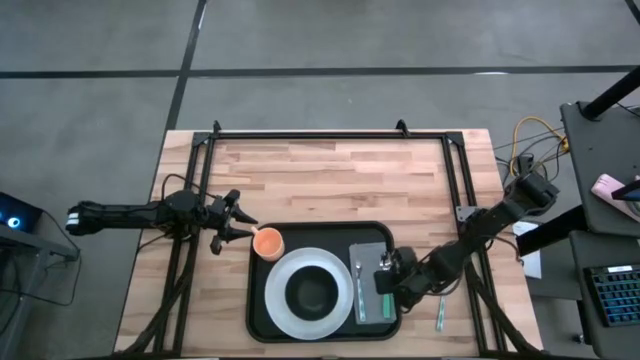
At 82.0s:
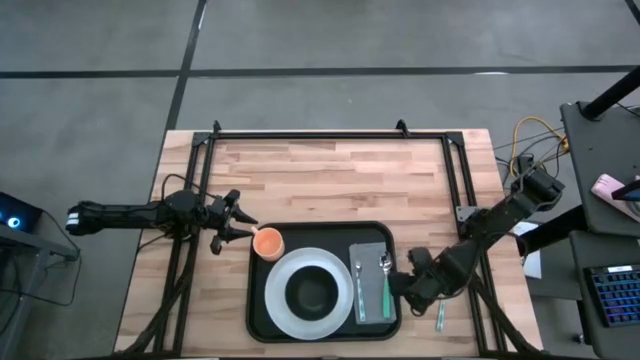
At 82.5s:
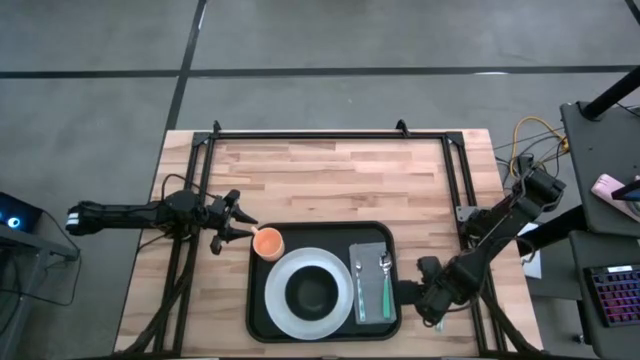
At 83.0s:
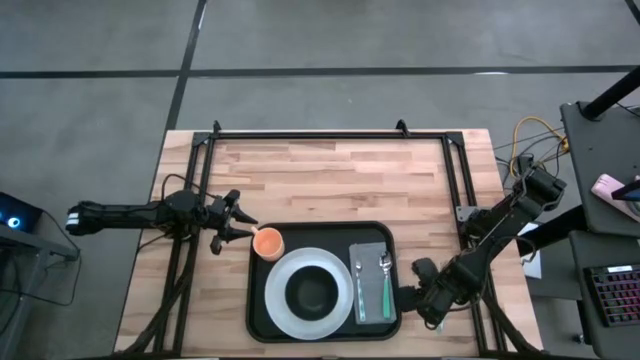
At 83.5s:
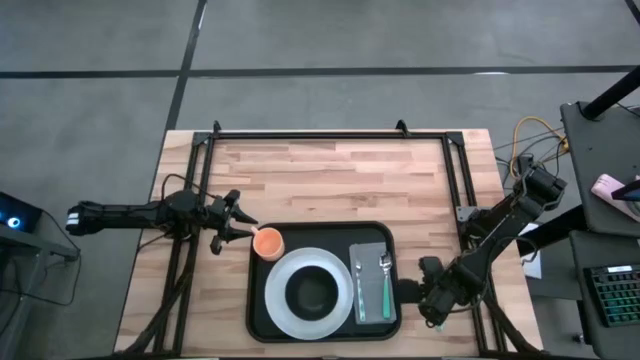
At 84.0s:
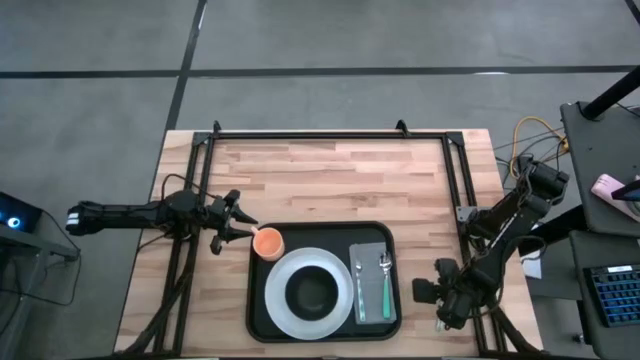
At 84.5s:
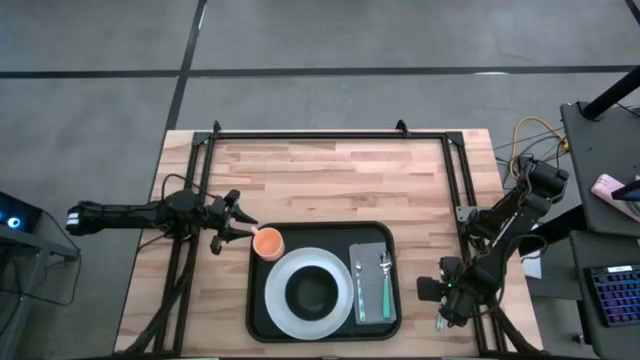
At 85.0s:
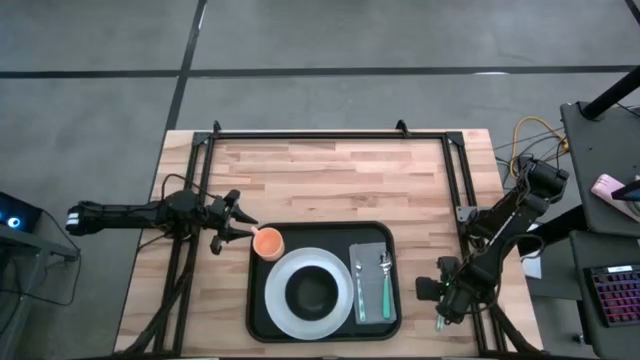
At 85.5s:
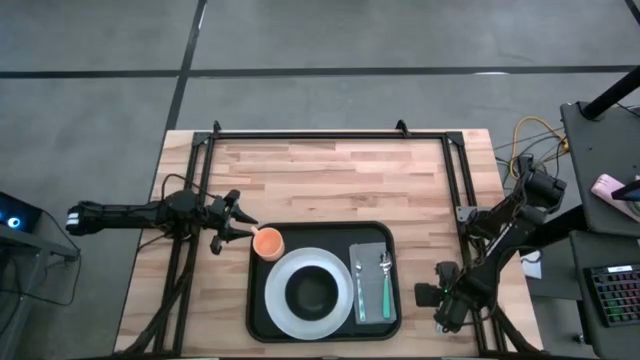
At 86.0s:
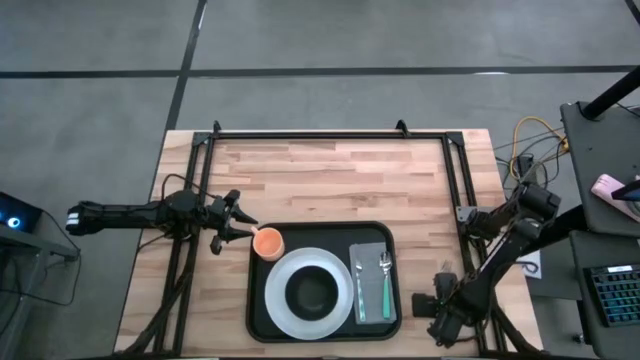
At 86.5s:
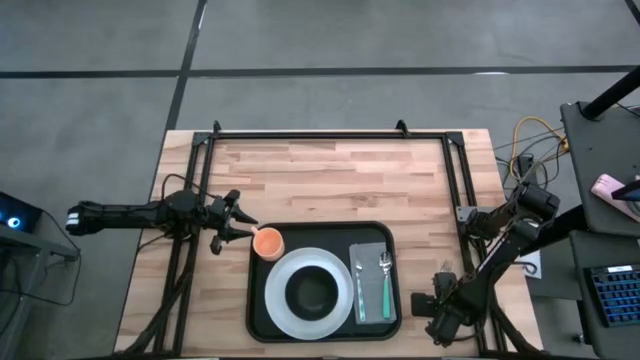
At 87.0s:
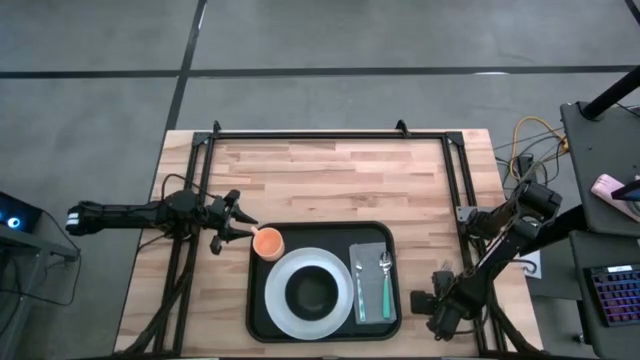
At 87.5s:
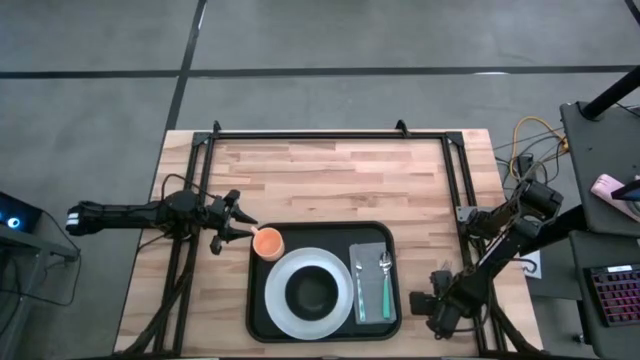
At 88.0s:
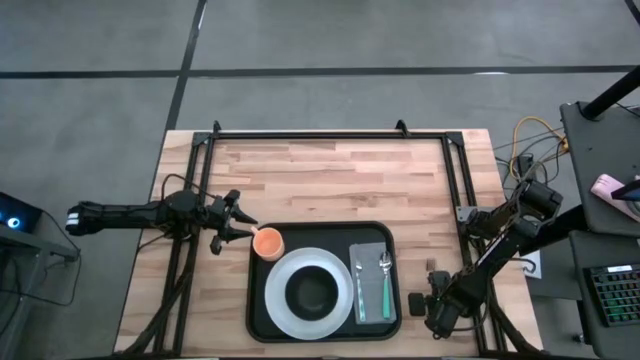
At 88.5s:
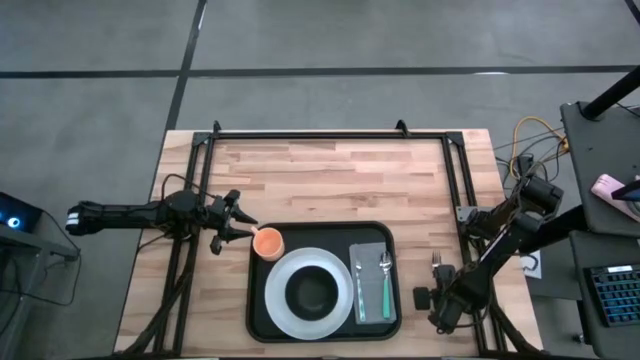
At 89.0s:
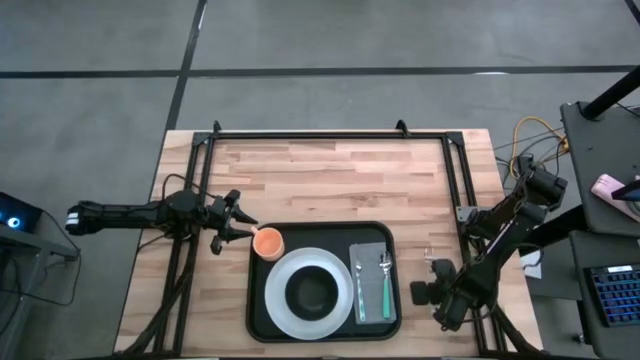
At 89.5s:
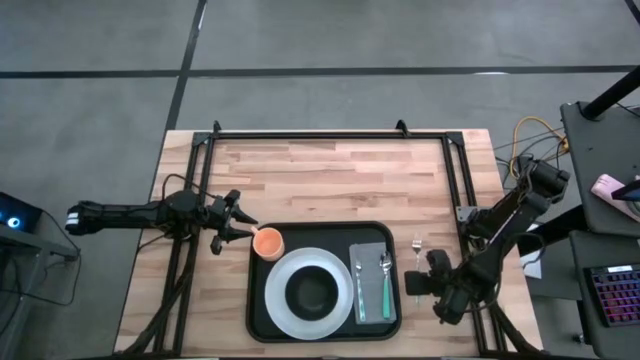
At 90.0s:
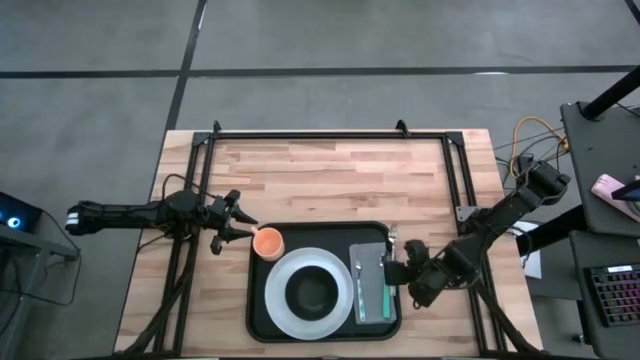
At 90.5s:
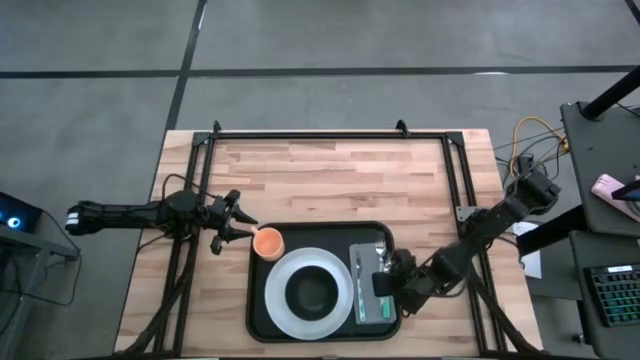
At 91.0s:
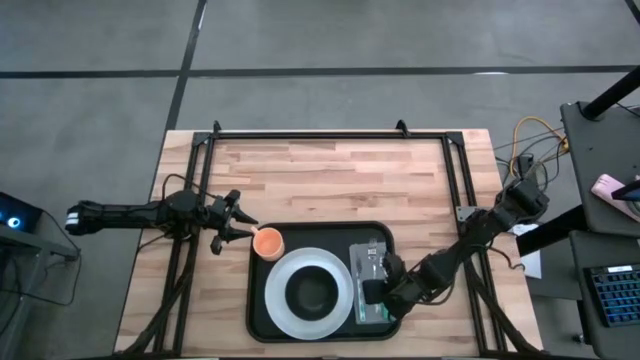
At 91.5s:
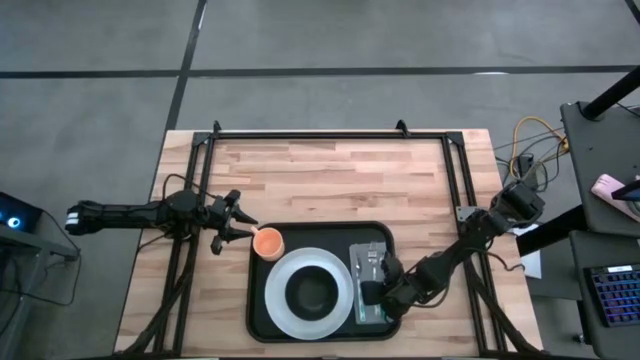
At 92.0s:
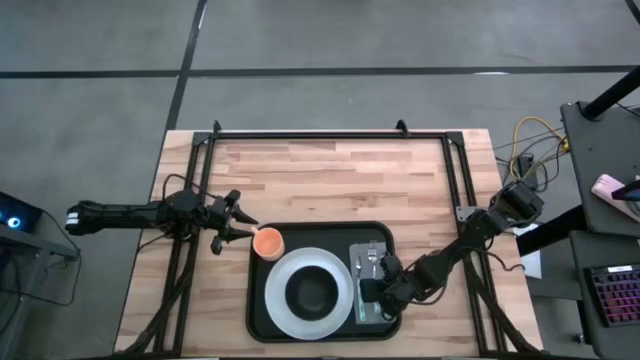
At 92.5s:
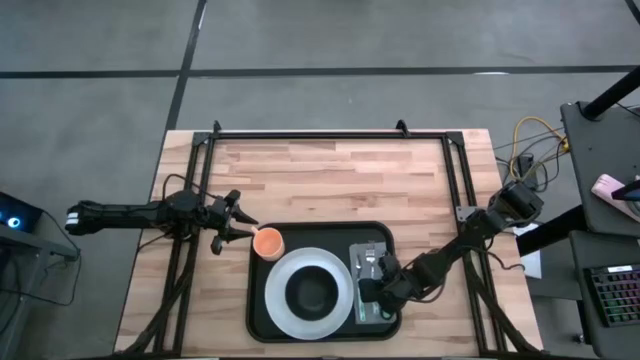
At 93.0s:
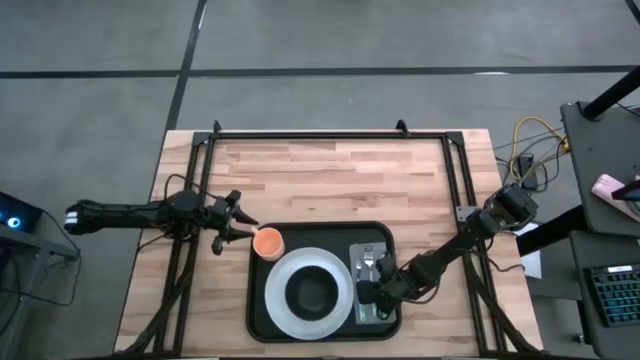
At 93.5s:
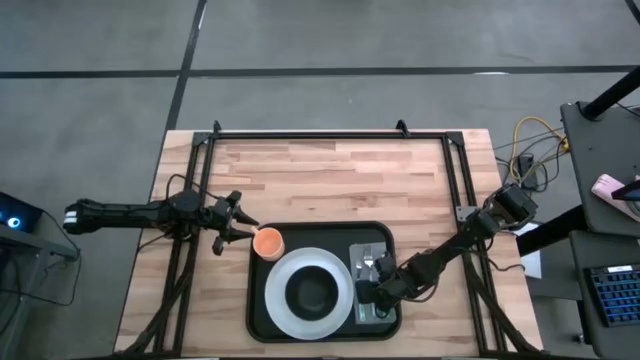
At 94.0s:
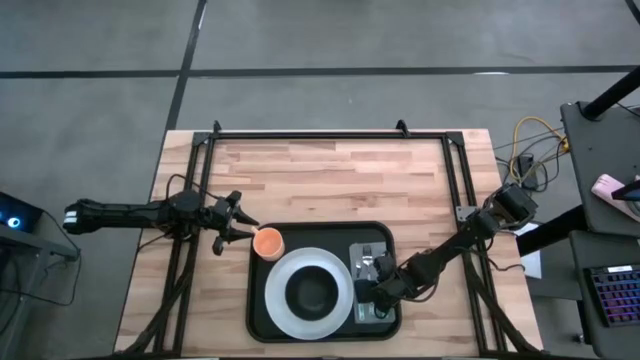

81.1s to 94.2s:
Task: Set up tray
Put the green fork between the green knife and green spoon on the gray napkin on the black tray

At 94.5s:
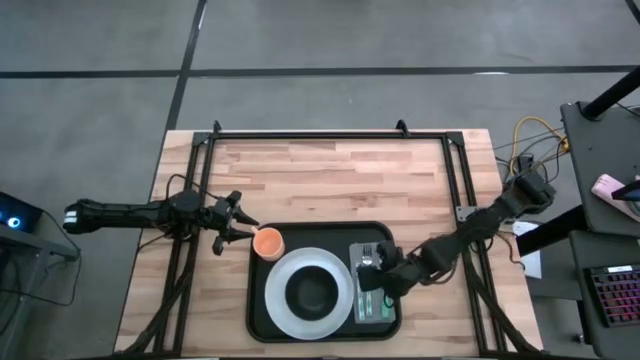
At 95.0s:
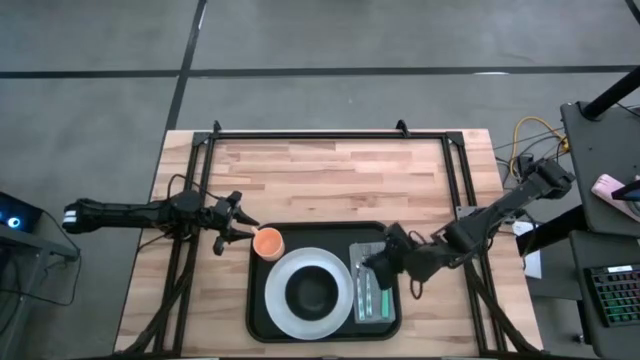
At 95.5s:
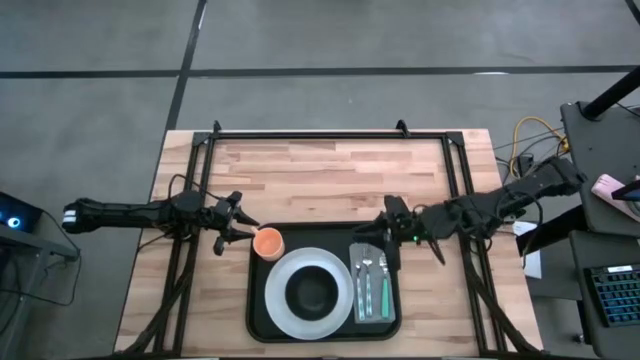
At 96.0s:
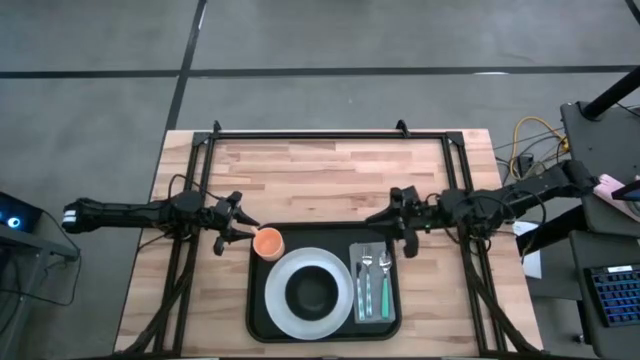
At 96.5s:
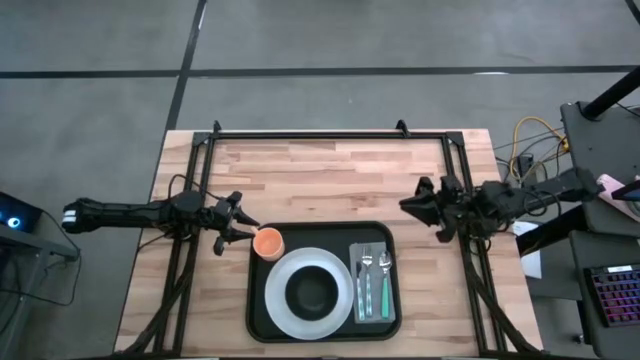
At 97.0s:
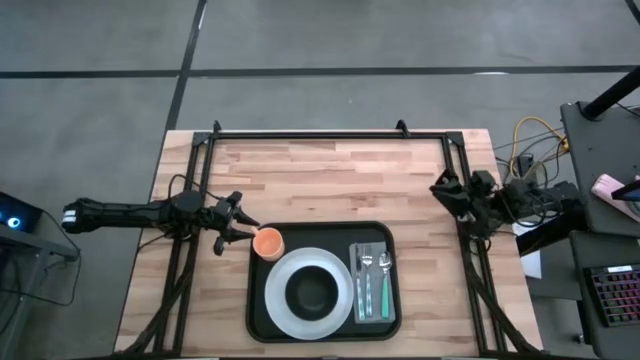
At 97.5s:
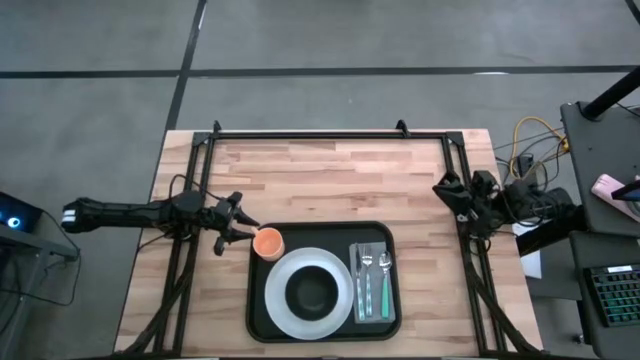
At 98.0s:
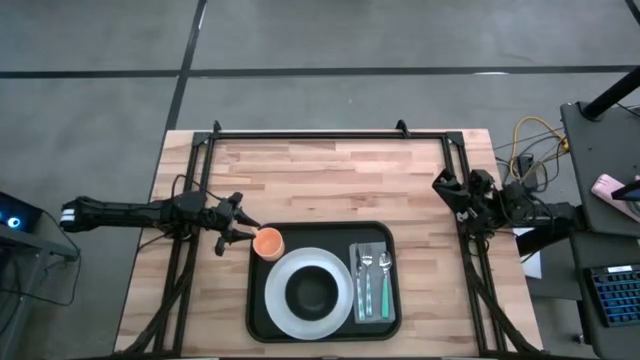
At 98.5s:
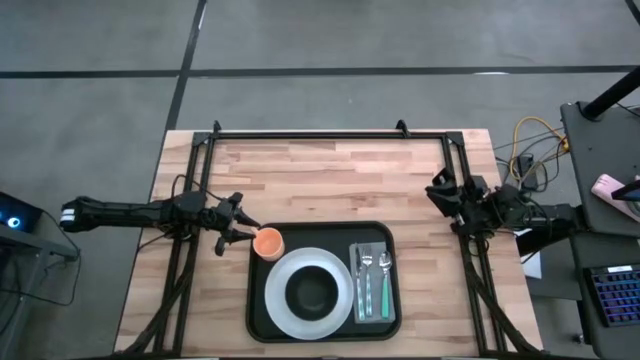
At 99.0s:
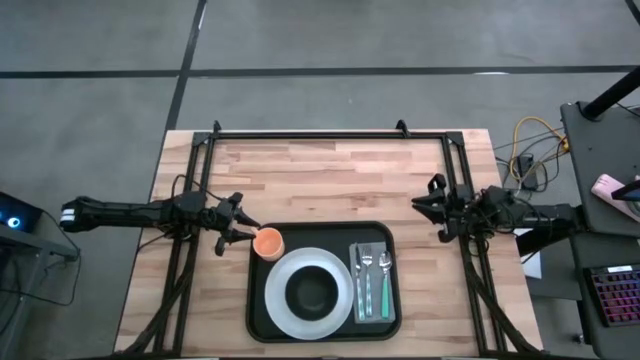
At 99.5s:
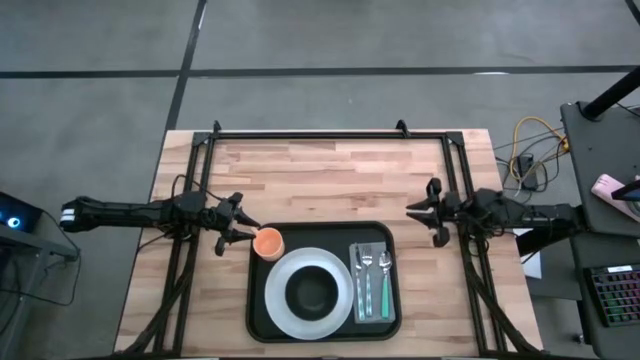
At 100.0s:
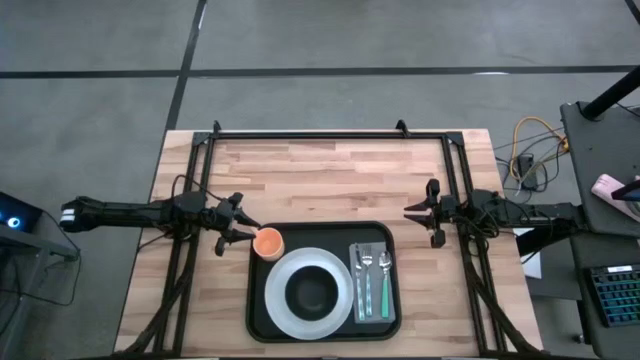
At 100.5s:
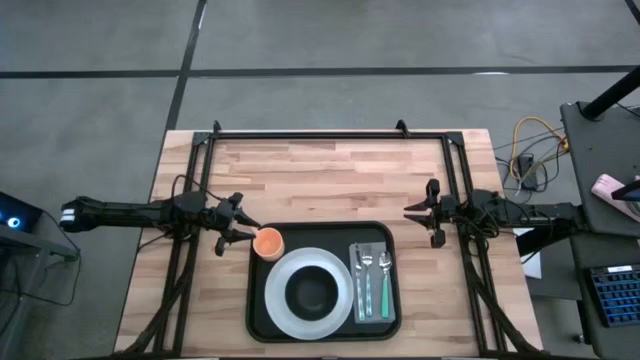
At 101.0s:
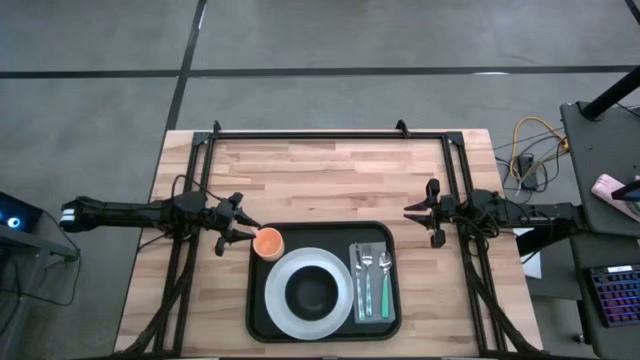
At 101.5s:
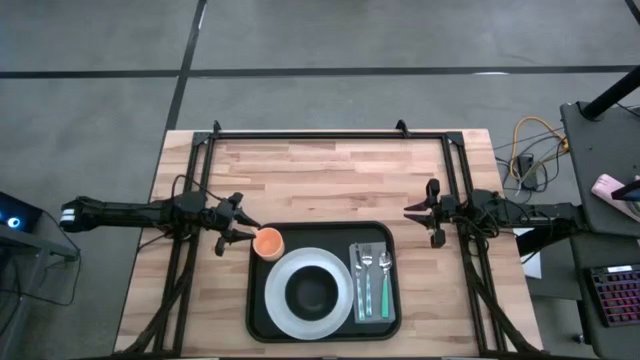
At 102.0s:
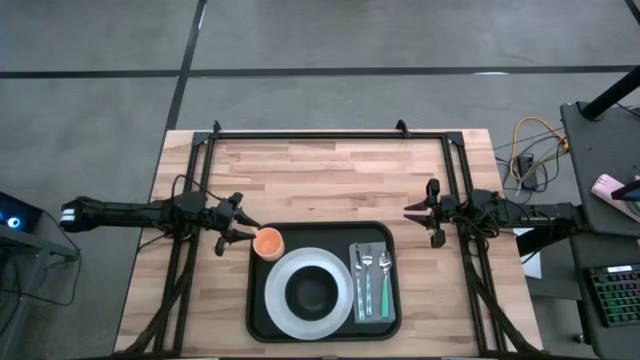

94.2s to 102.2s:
Return to Home Position
